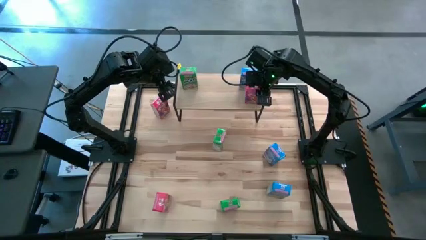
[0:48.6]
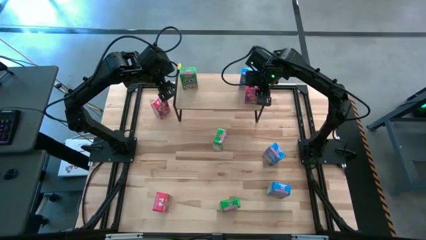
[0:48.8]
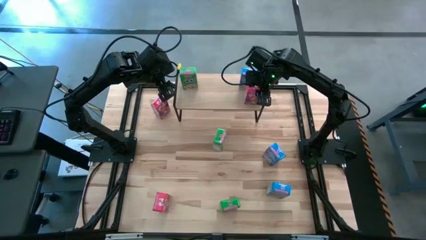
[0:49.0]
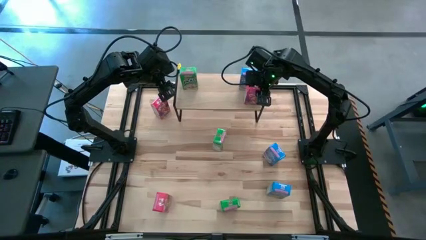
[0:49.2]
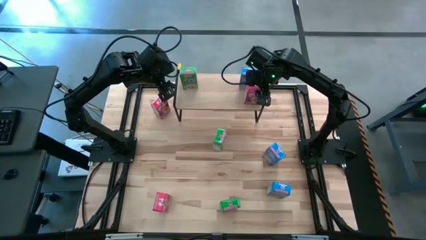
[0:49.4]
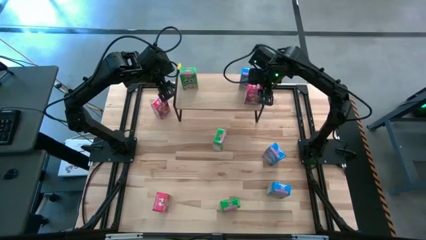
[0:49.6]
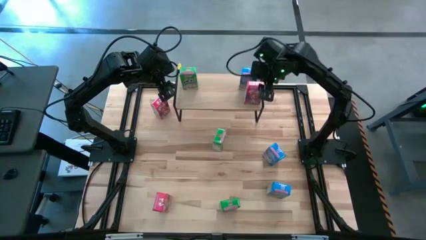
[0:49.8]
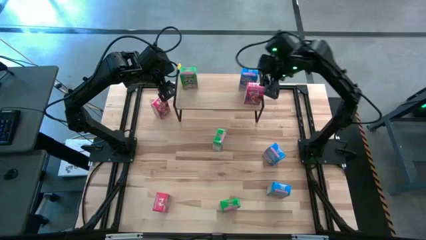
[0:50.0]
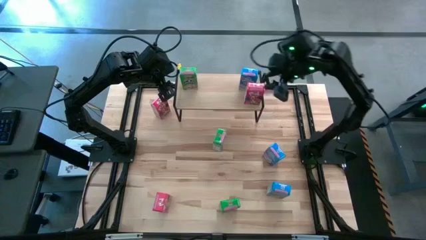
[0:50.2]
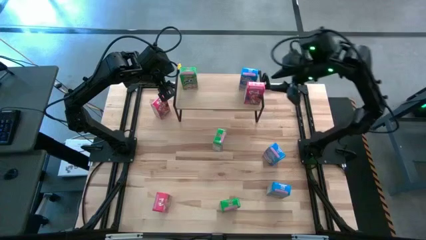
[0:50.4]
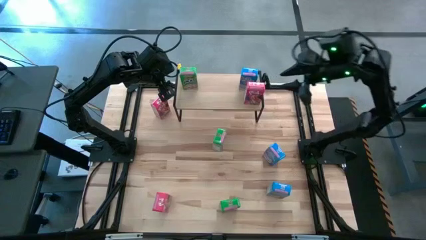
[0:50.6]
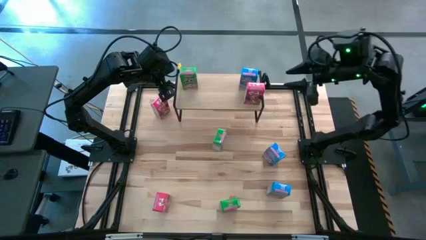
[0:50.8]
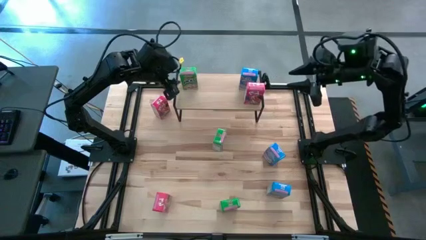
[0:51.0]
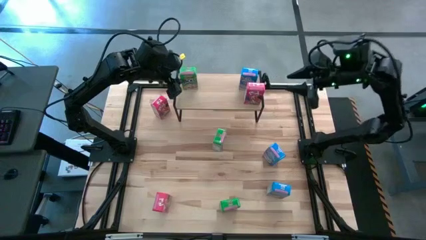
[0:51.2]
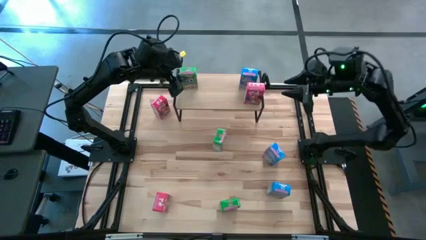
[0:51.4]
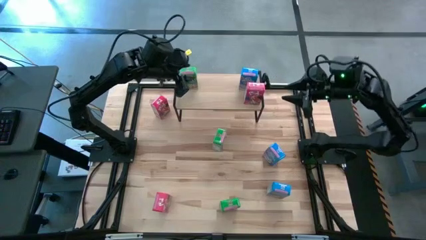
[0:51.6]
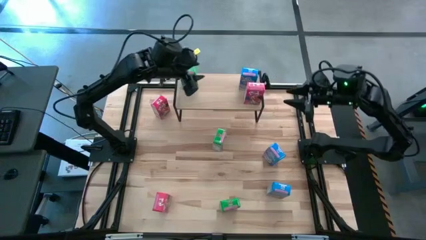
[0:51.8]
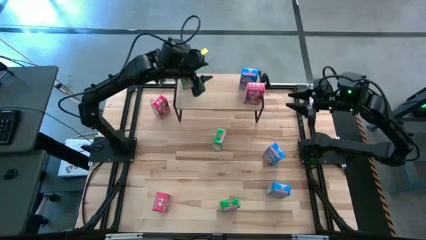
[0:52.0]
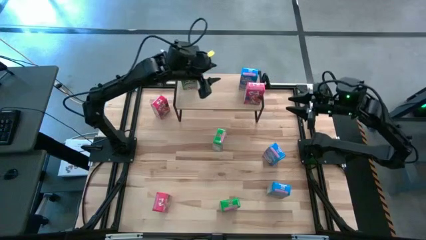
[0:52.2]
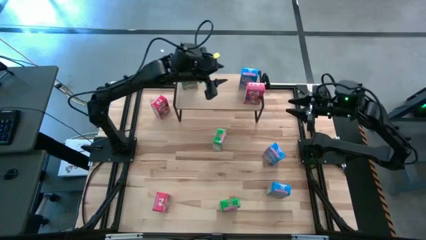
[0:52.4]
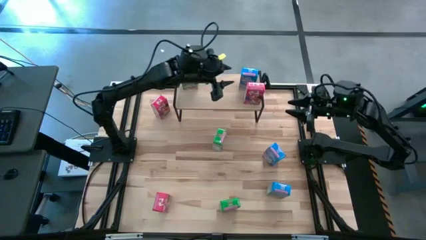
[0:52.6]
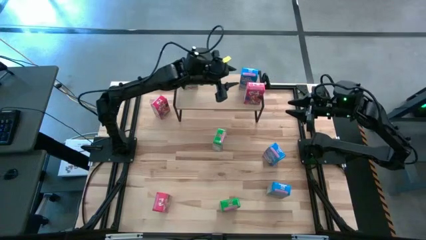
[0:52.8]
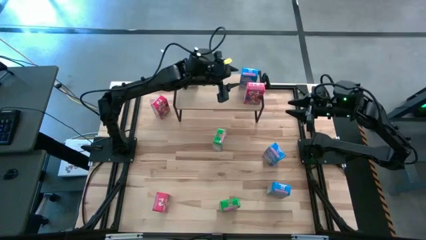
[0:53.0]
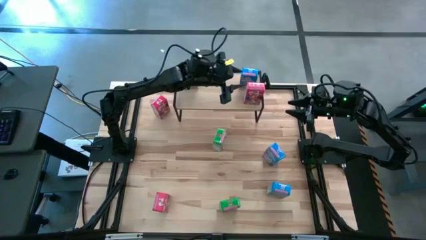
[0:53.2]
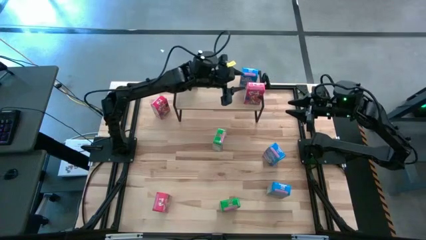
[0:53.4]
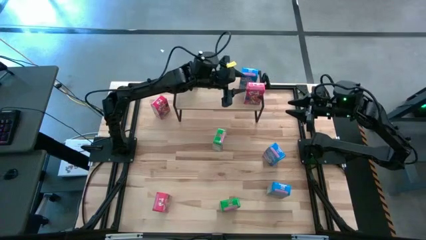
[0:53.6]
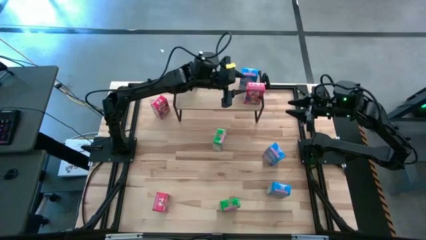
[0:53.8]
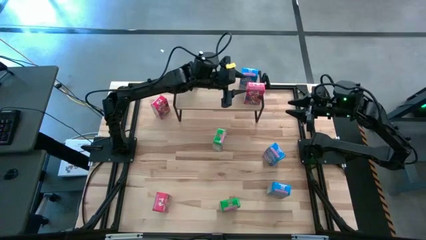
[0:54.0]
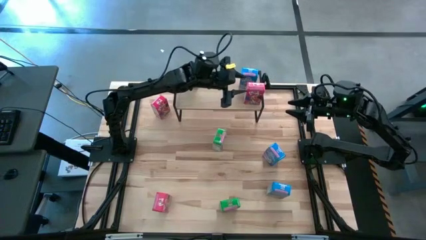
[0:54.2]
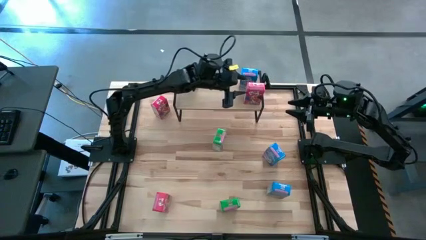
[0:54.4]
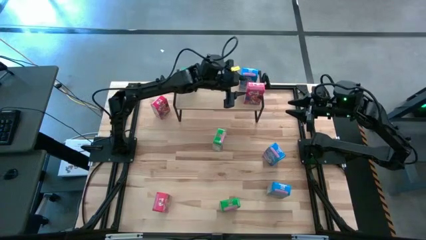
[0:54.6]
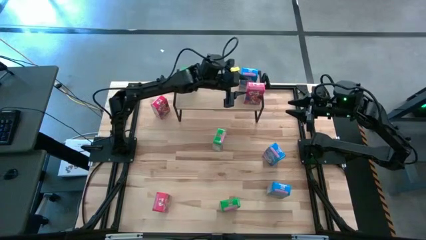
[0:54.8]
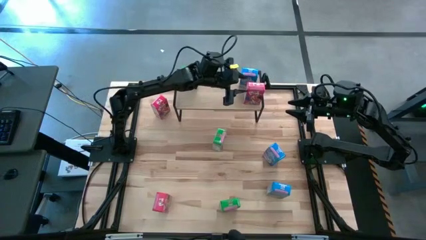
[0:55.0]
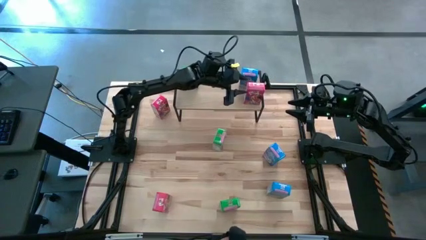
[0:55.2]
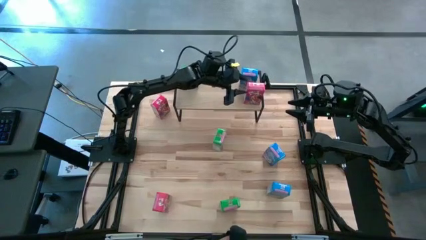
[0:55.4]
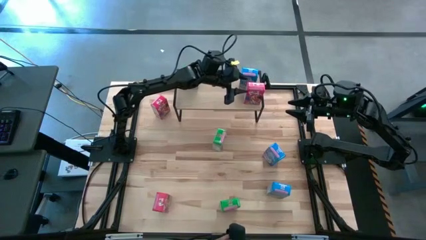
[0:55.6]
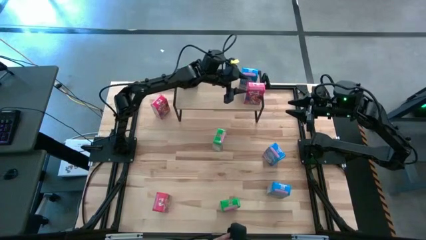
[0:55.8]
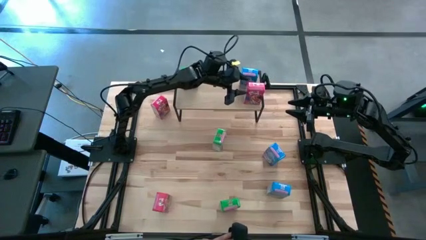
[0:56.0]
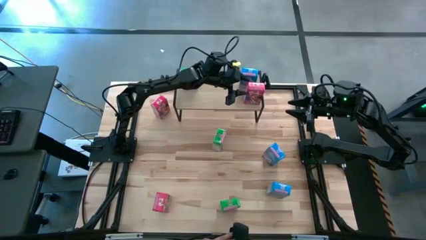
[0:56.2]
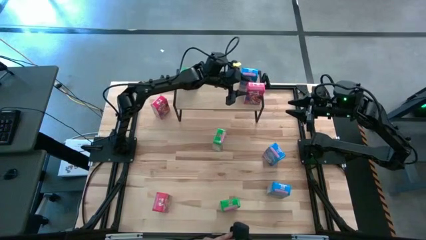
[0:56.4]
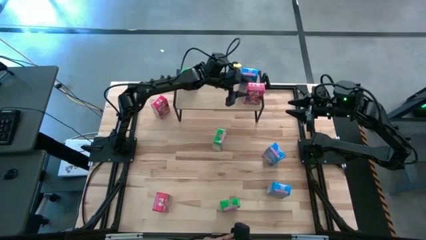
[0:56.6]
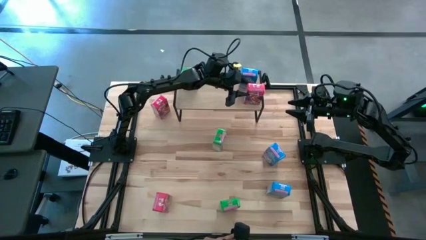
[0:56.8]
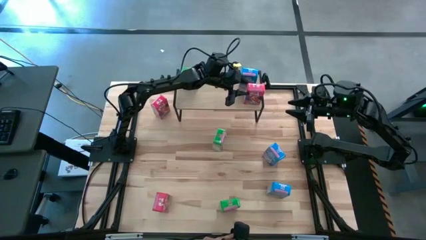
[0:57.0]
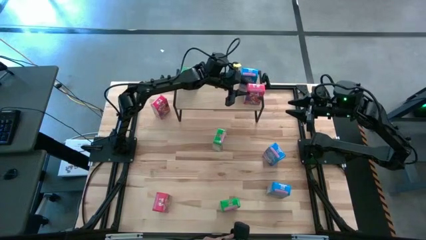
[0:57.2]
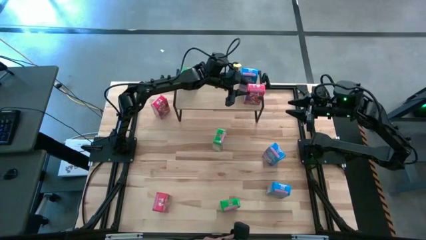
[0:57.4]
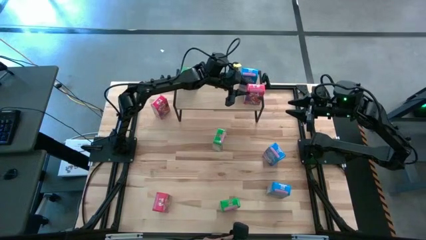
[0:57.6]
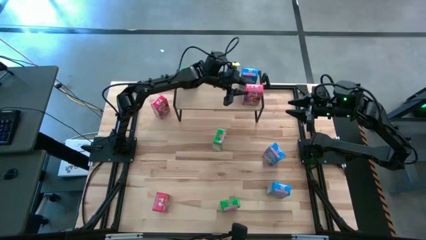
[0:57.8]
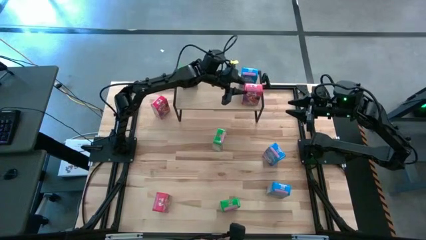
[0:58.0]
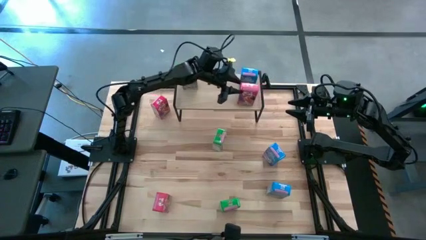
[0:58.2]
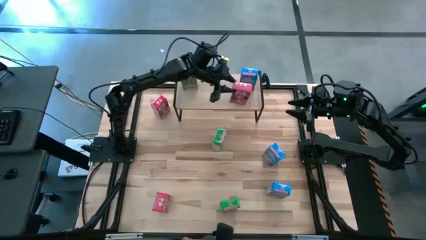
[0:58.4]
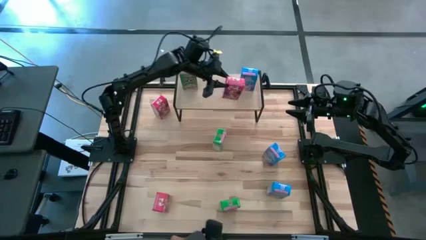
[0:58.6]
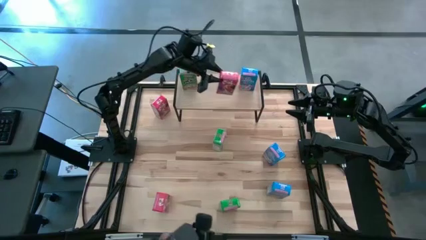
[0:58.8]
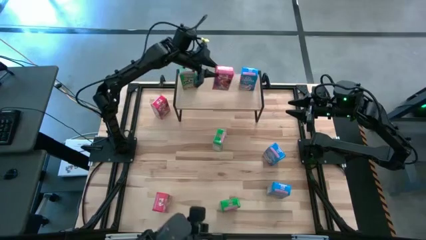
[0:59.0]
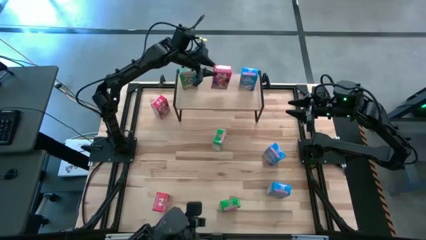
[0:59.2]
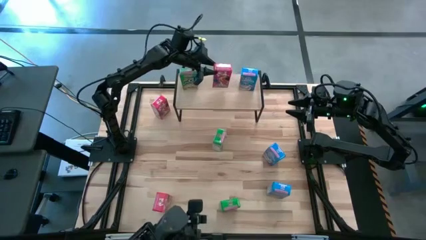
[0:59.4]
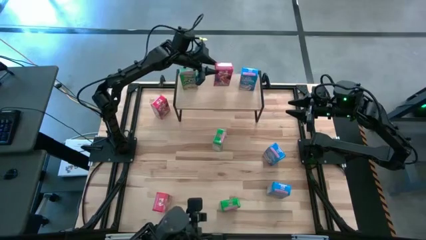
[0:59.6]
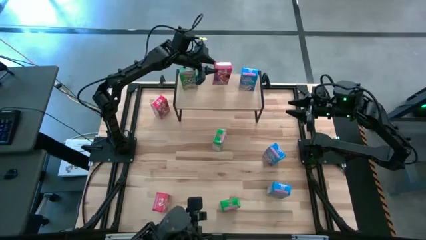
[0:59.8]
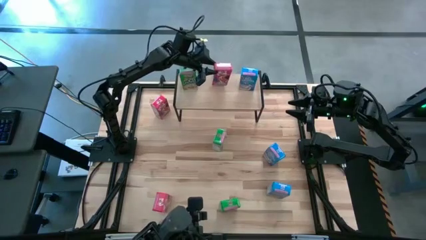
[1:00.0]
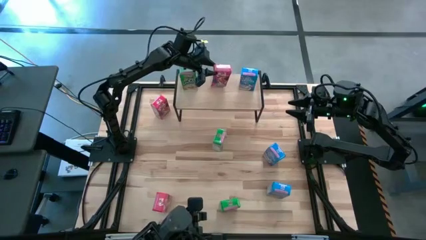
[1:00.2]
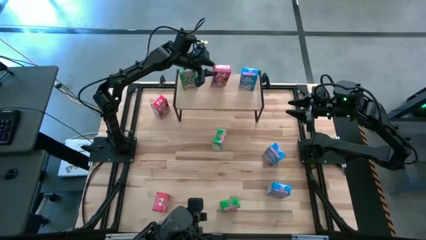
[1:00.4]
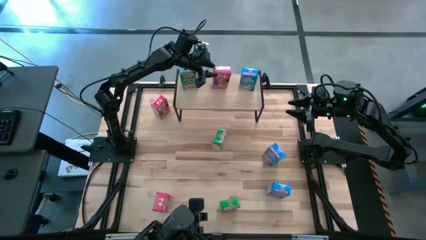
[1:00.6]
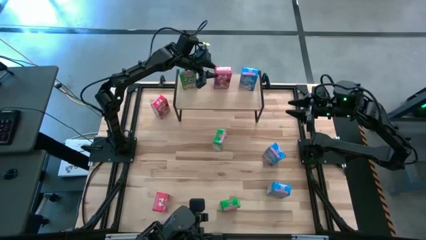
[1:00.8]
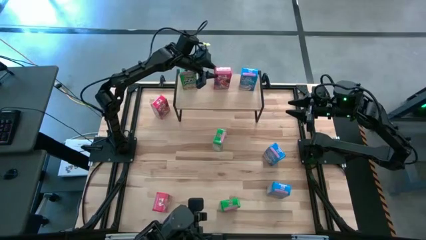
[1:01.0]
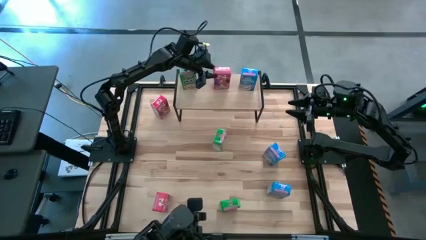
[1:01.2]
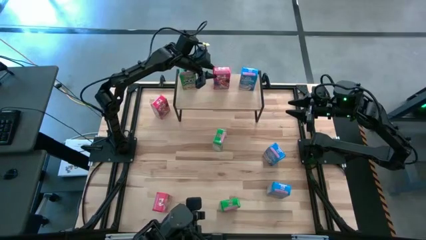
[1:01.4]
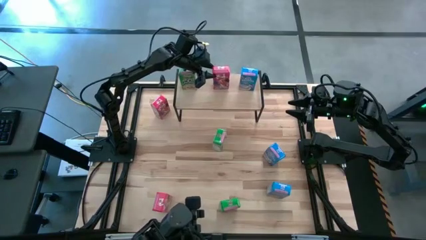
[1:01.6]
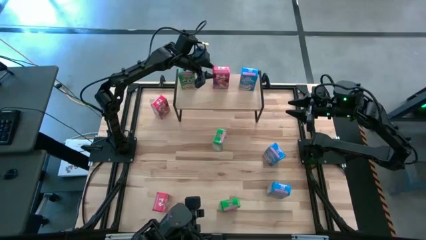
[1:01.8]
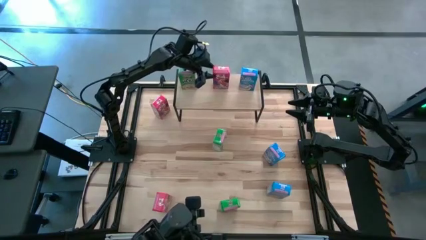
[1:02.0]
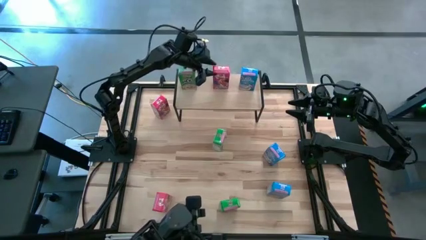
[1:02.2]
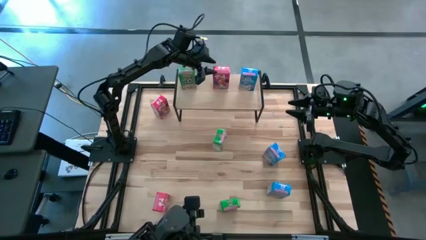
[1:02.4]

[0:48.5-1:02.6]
Task: Stack cereal on shelf
Put the right red cereal box on the shelf
